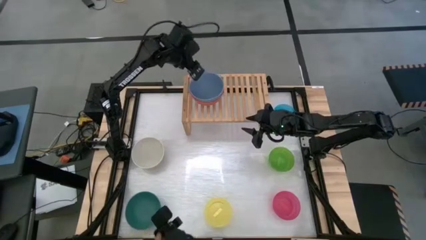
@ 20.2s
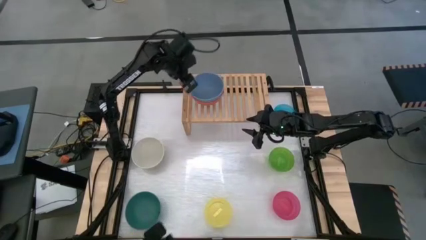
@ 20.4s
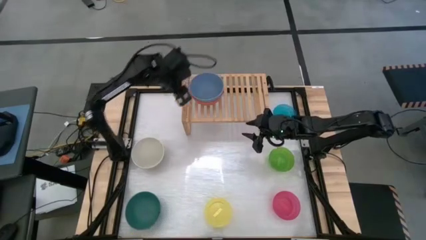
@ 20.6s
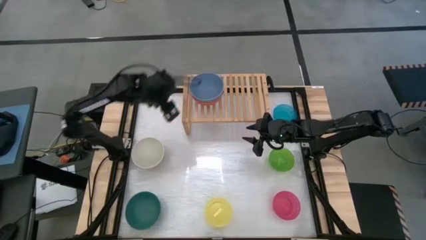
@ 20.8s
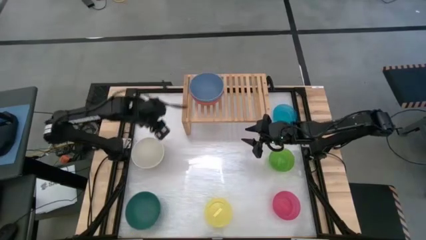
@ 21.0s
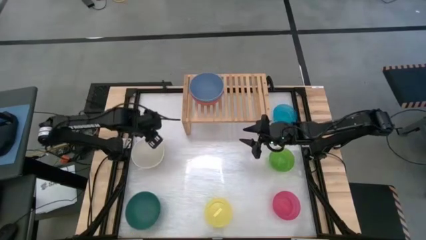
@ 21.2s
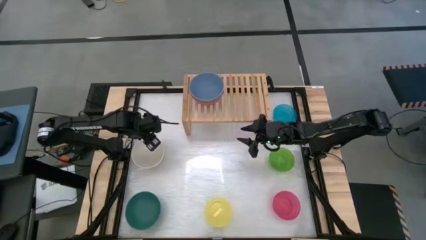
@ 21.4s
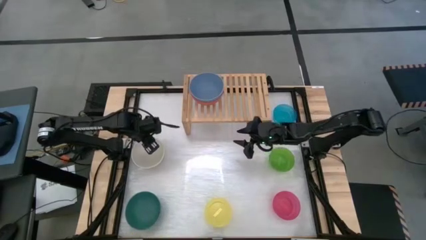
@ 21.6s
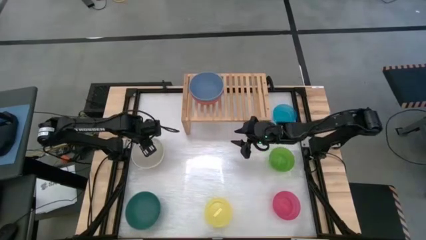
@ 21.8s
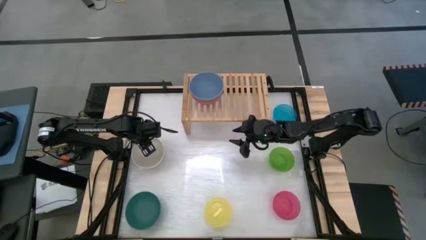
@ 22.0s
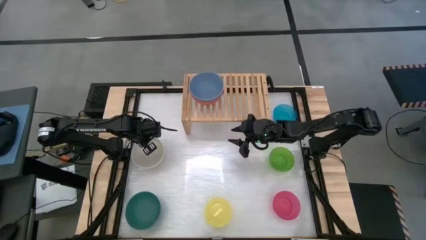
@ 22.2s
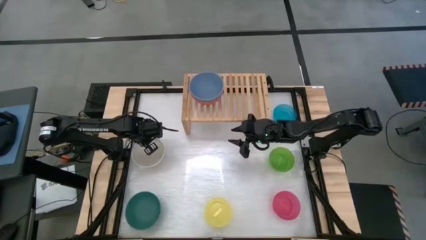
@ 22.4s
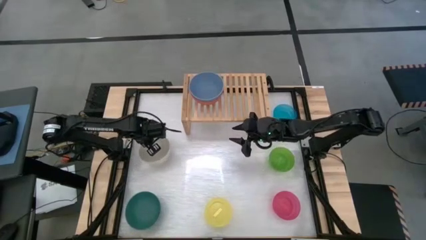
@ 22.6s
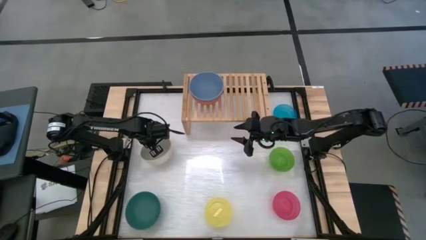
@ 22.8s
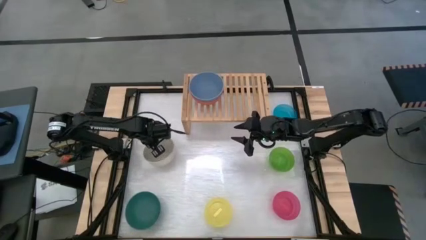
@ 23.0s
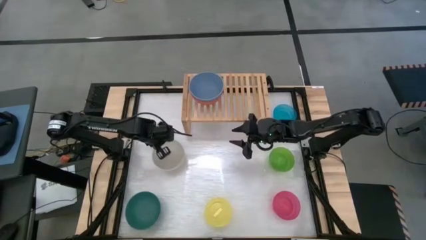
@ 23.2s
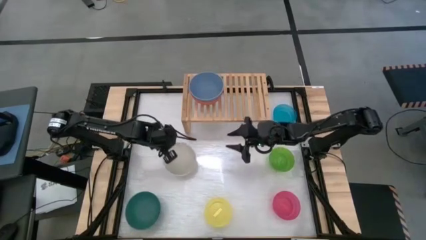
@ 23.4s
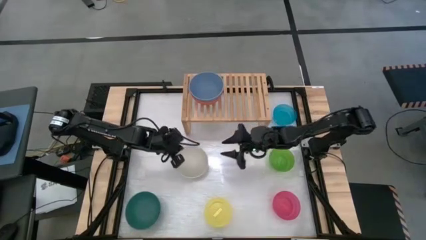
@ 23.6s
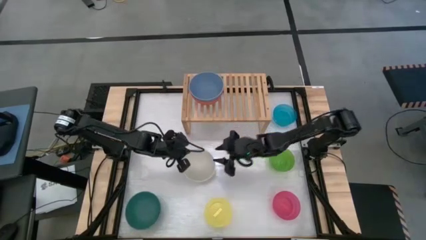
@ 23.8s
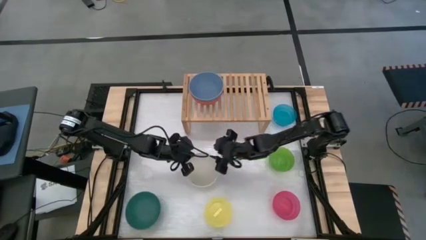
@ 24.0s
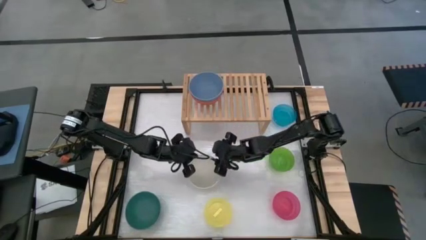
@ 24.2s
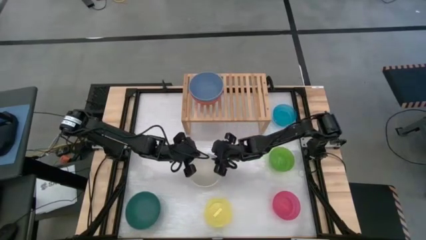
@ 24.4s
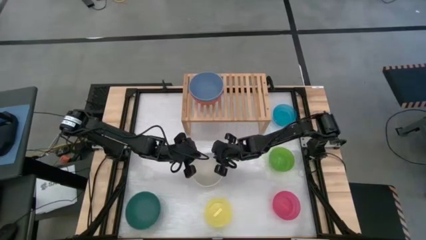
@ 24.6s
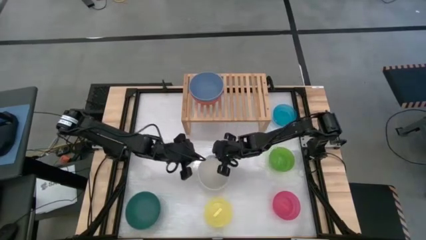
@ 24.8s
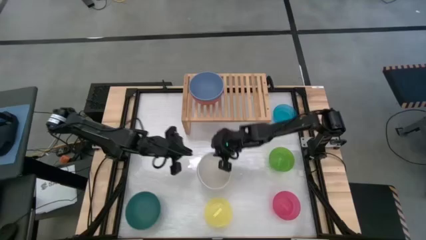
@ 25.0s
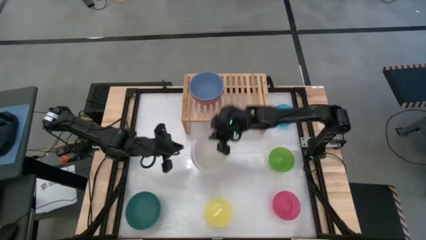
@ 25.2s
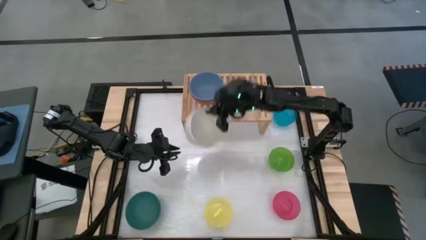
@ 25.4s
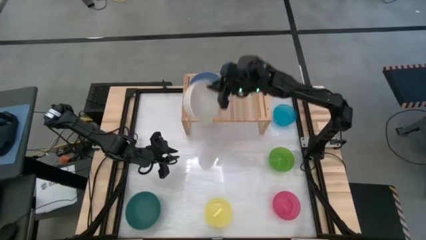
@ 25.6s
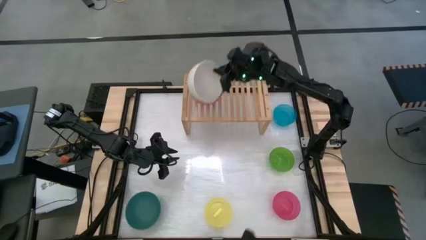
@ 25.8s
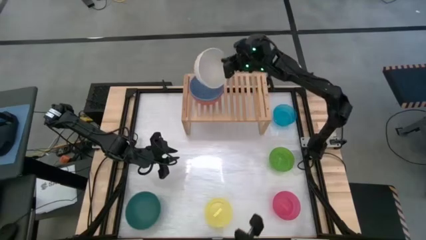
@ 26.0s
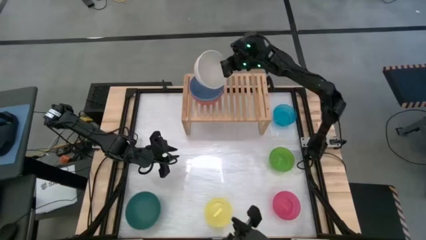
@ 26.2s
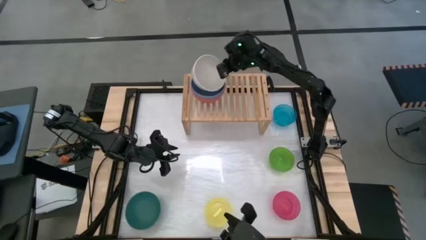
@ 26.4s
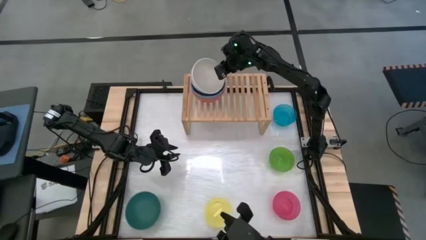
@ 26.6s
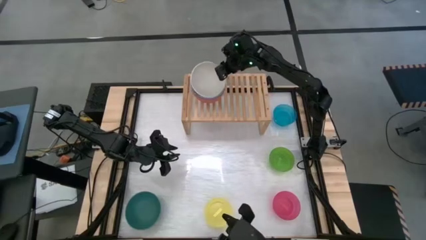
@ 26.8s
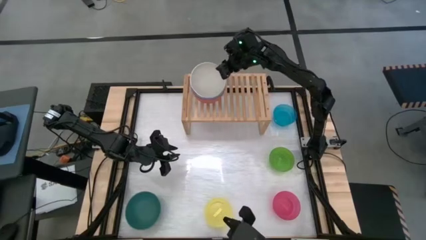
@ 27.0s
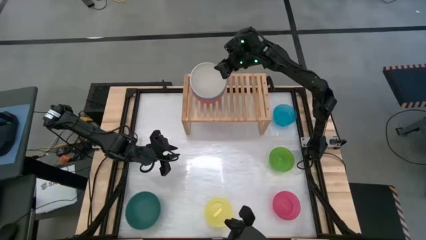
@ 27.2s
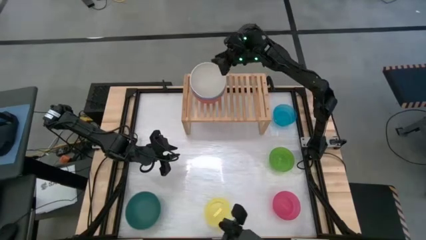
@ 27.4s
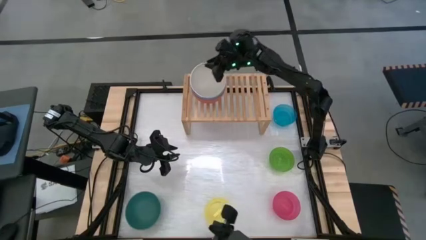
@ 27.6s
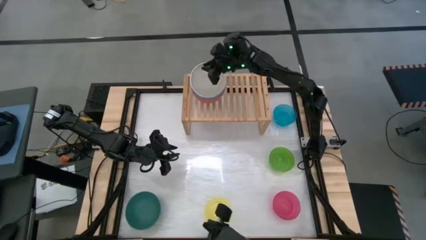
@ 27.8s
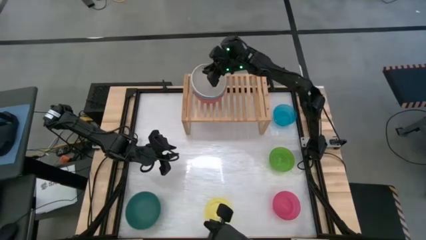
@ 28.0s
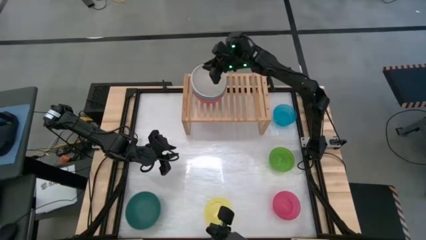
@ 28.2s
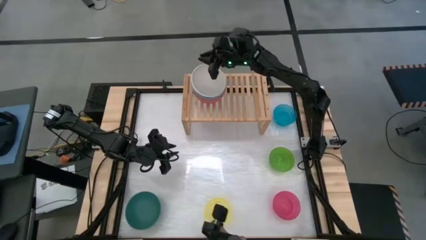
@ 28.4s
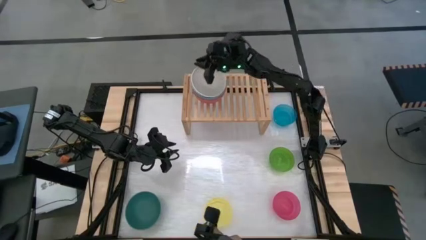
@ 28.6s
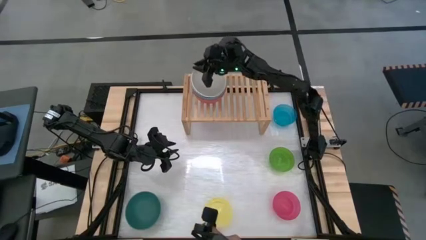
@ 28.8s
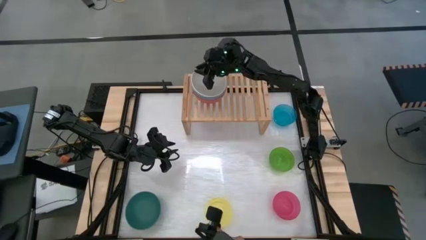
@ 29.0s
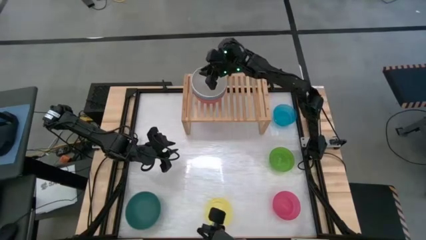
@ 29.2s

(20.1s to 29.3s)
Task: Place and stack bowls onto a shelf
Stack the big white bowl on top of the big blue bowl on the shelf

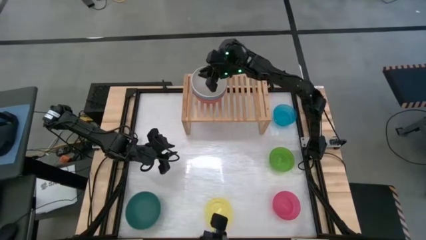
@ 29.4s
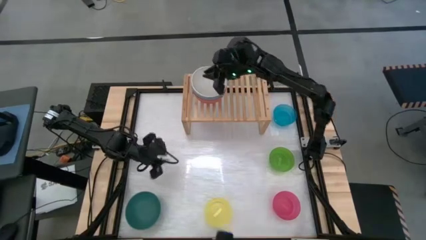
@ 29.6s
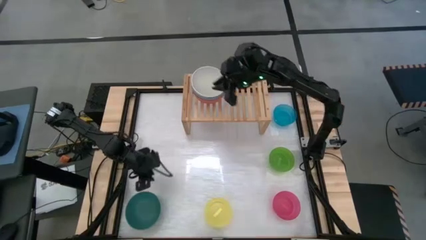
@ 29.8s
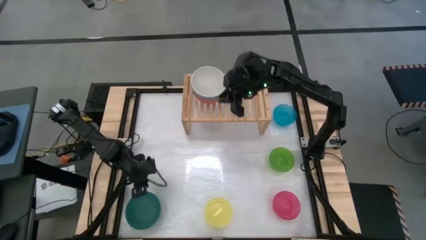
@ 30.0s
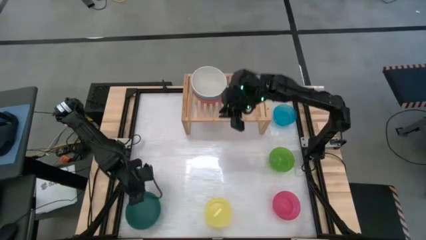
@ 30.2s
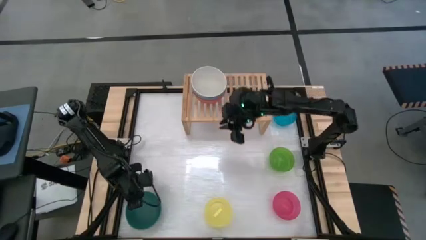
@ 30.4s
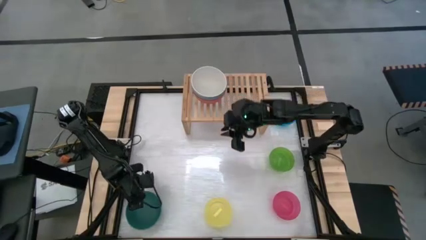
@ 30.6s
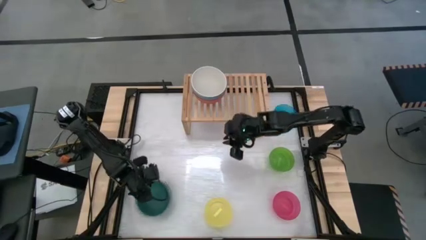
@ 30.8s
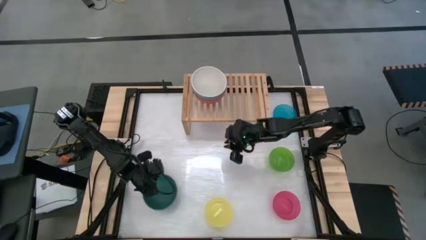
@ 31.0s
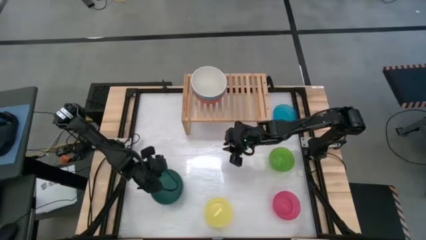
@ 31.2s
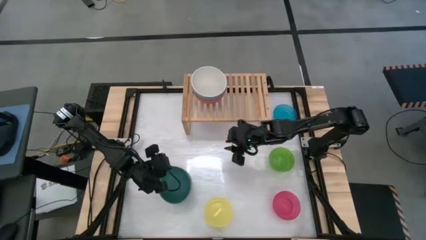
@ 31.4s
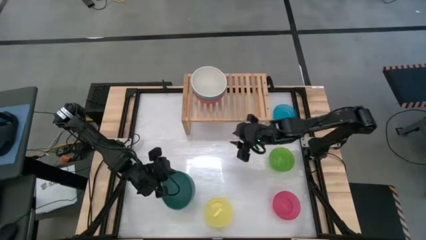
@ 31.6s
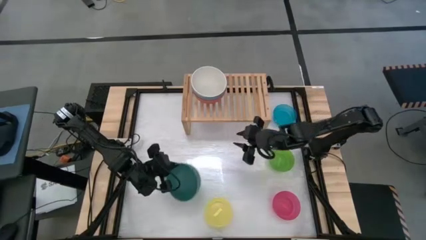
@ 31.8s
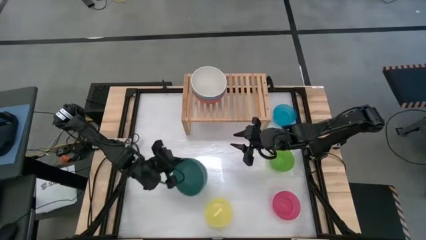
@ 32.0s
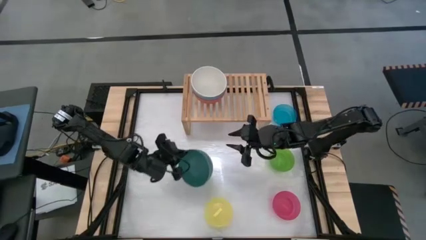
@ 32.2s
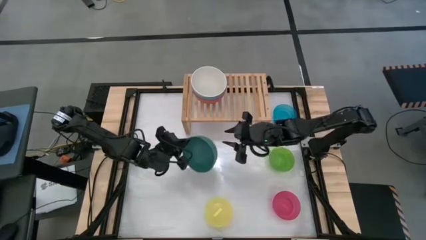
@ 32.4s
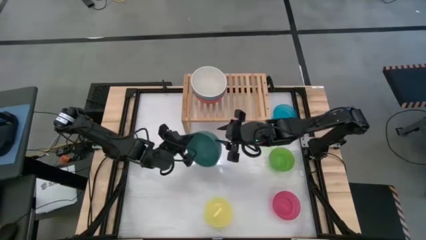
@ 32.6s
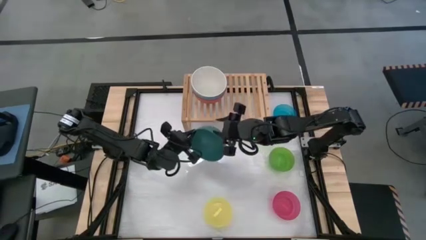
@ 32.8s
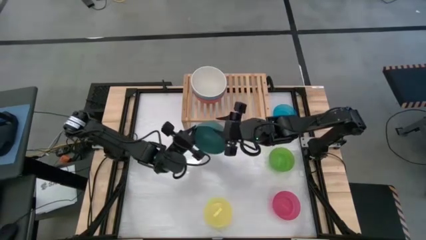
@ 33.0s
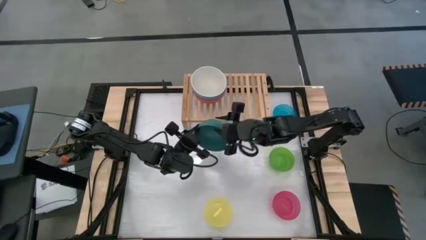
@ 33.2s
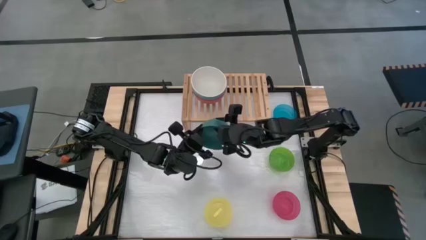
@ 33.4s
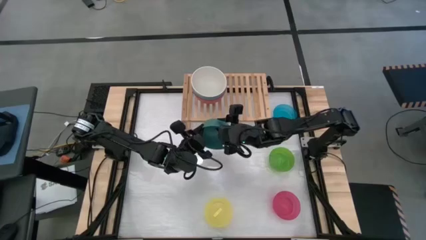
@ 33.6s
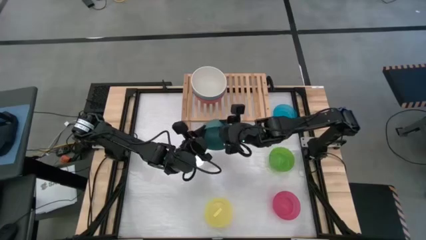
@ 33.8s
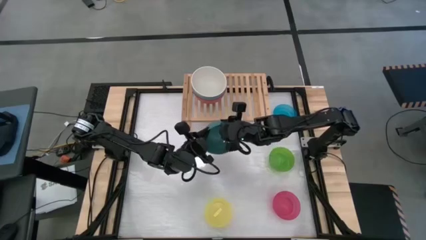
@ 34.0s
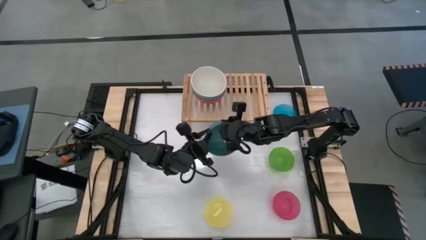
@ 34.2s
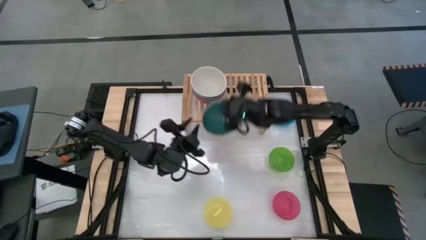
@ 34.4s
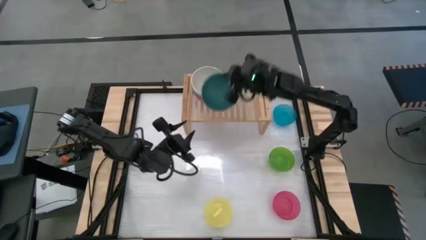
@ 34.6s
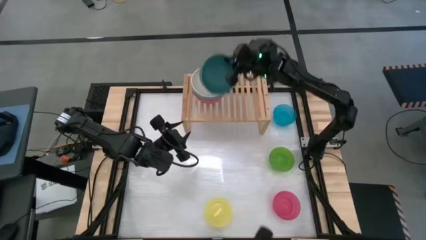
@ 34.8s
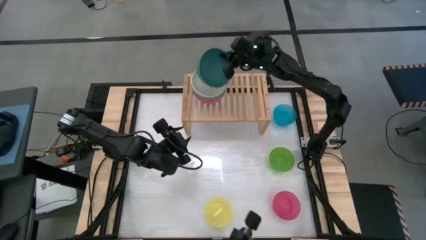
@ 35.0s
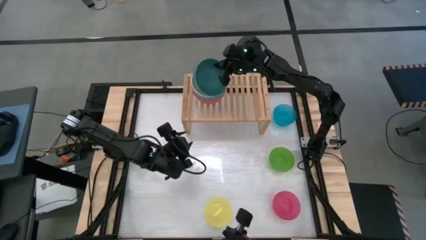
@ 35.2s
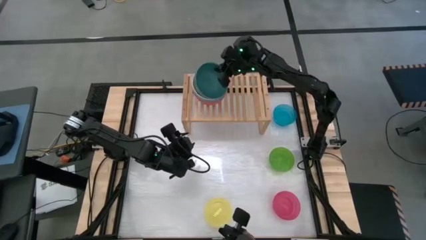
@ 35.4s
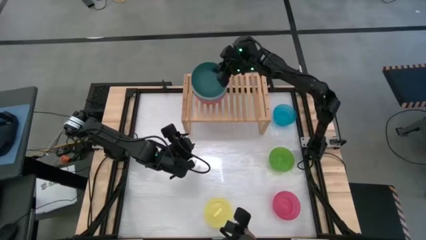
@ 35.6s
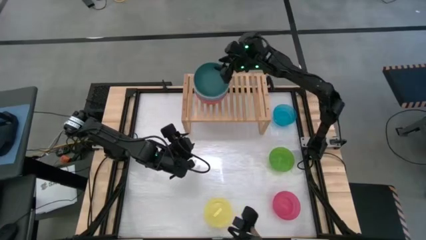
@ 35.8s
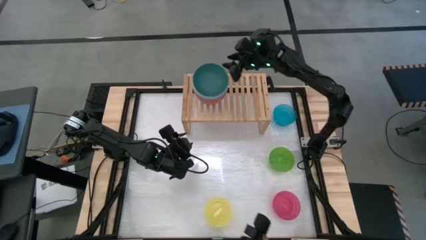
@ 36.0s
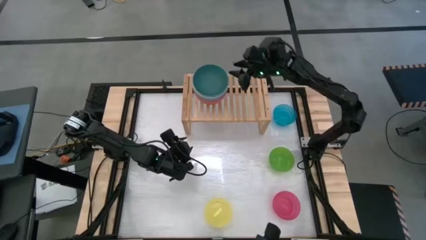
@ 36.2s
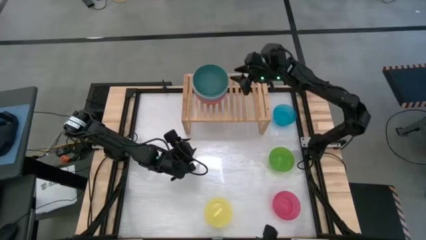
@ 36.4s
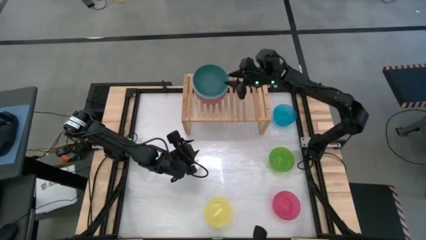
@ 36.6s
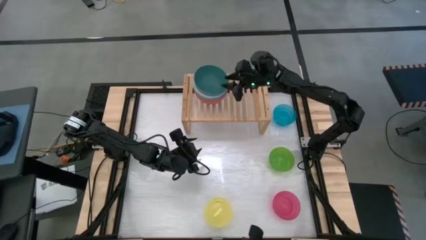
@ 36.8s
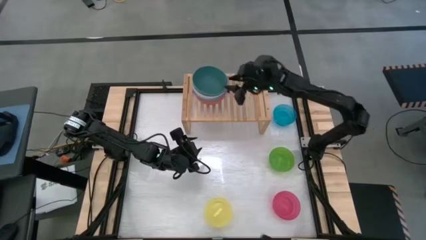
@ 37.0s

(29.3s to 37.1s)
Stack the big green bowl on top of the big white bowl on the shelf
